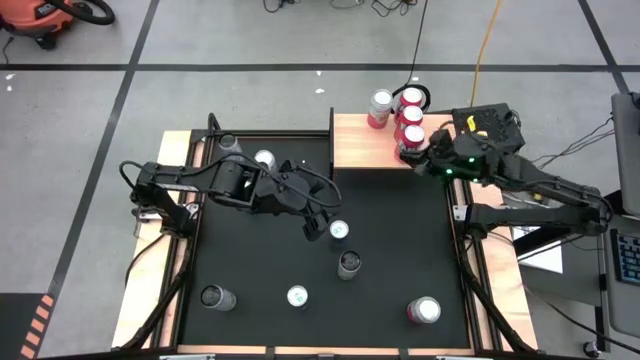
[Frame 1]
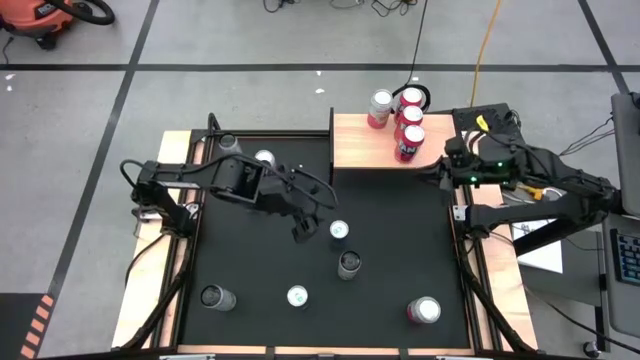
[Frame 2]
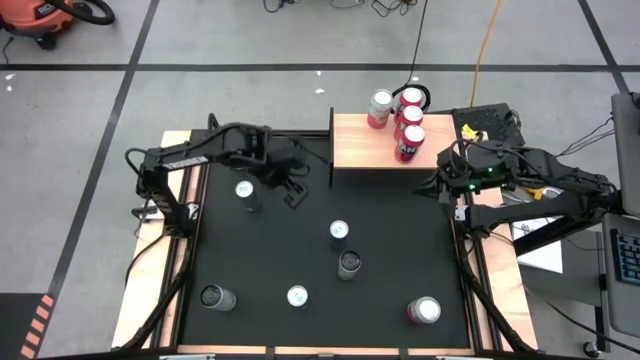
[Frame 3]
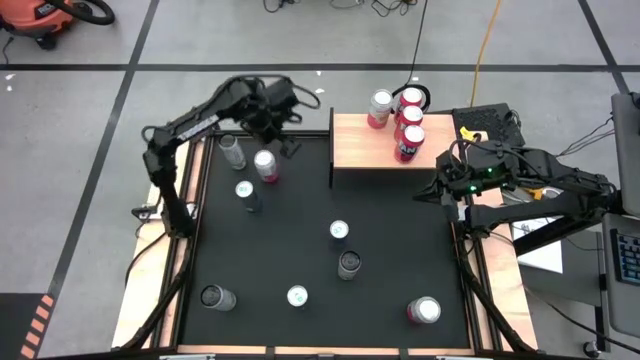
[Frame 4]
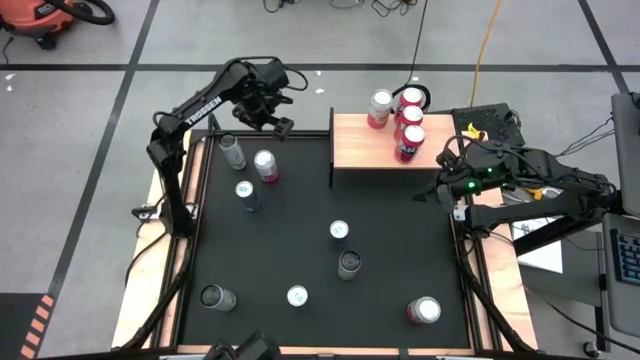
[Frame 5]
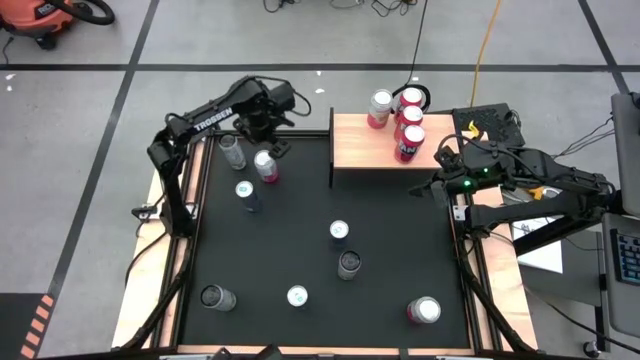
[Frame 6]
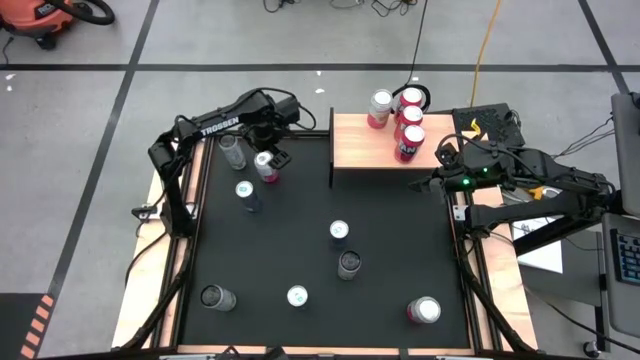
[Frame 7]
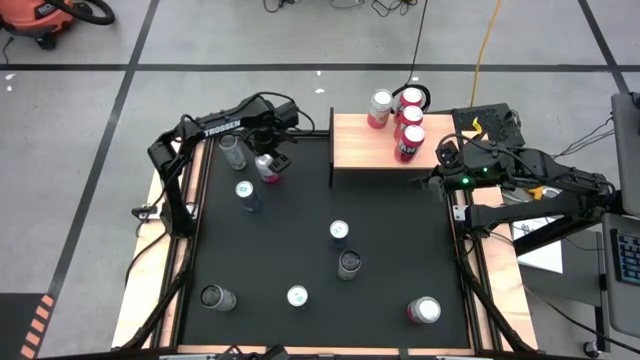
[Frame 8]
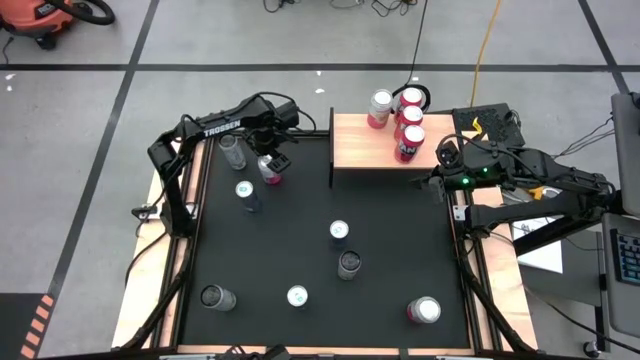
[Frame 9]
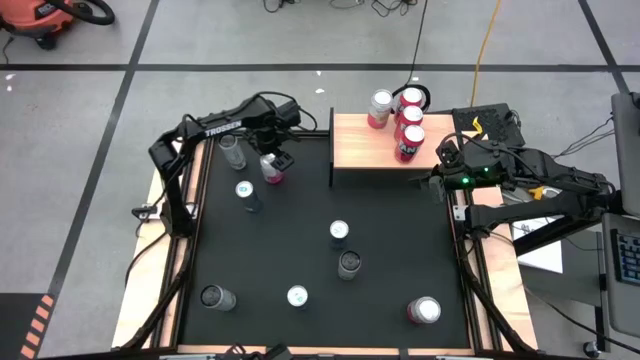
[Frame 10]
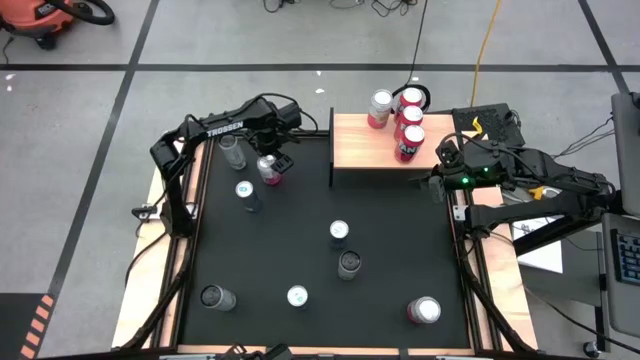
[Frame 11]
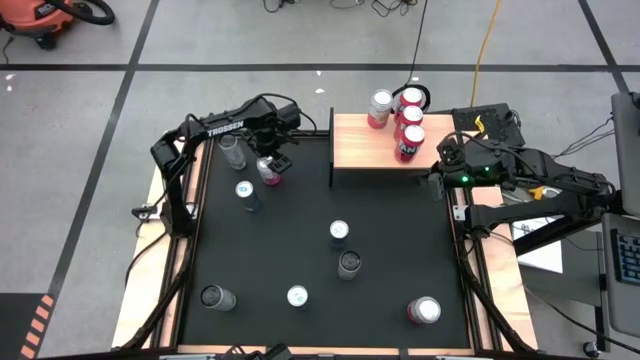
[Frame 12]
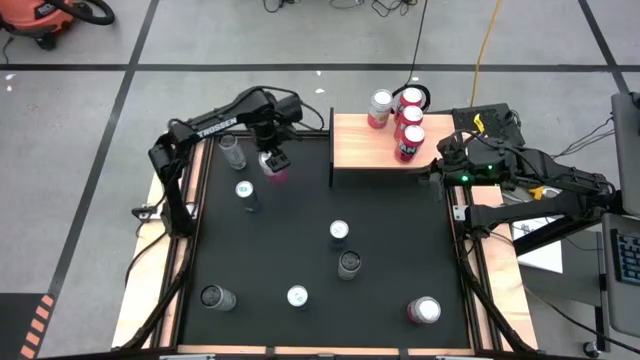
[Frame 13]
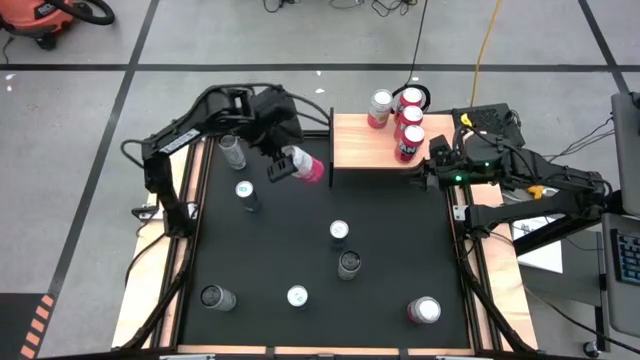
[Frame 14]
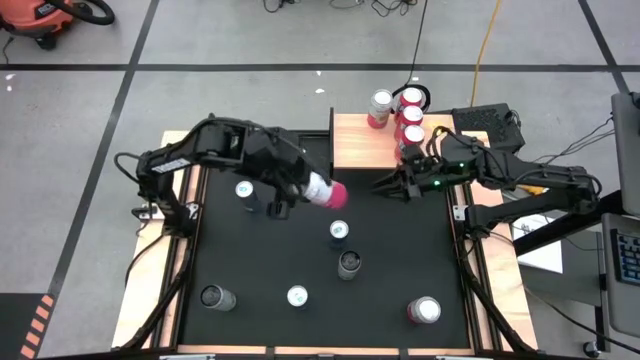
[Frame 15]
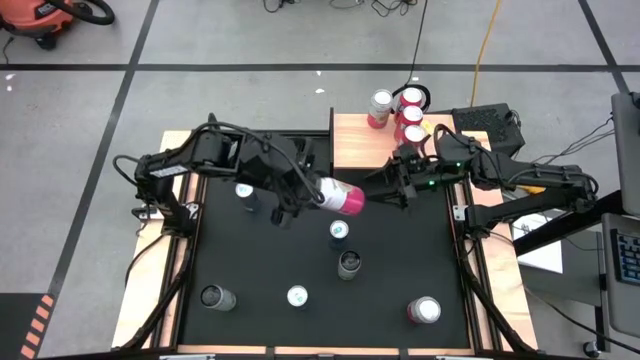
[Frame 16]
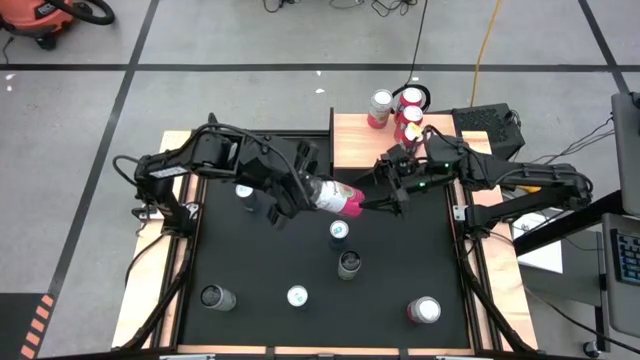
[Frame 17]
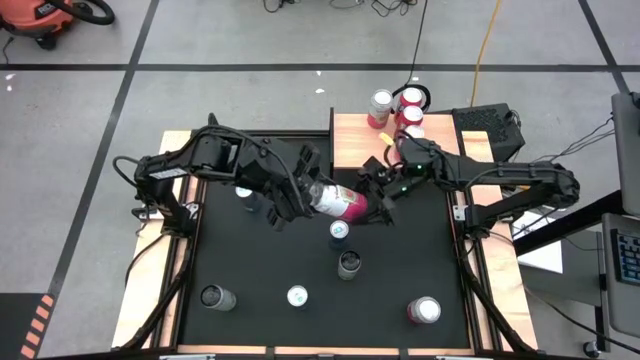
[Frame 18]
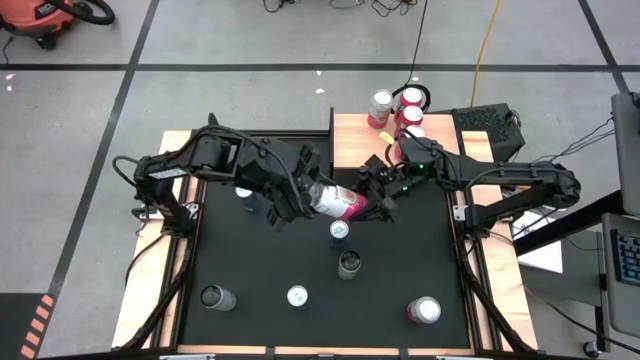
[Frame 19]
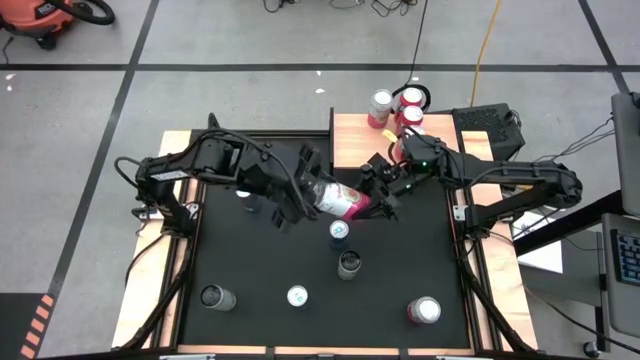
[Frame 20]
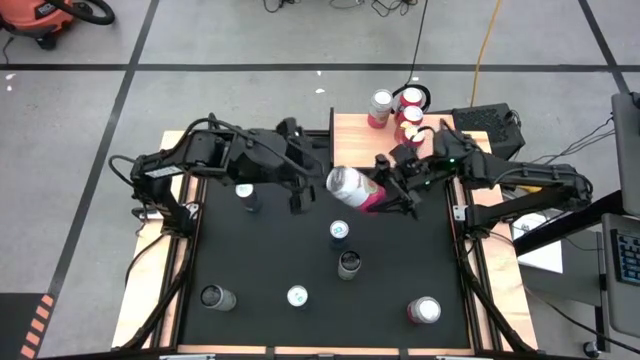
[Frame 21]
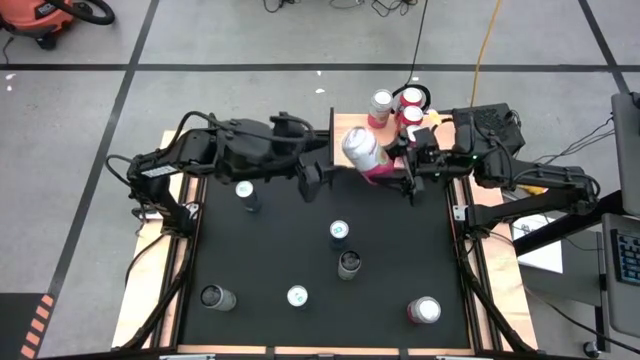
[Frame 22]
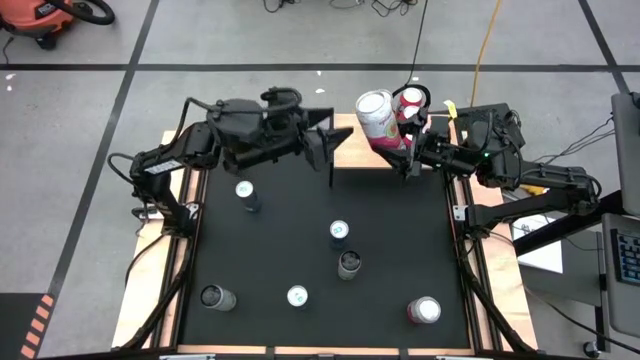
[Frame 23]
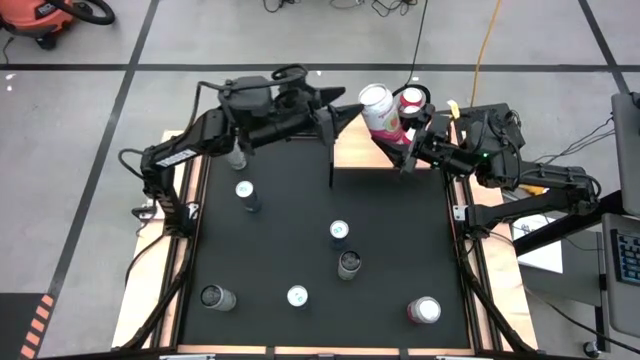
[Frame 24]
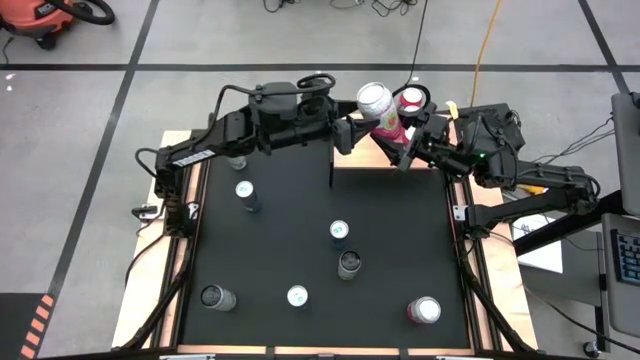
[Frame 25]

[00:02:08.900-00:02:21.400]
Task: Place canned beverage on shelf
Put the top pink white soda can on the shelf aligned with the other pink white soda can

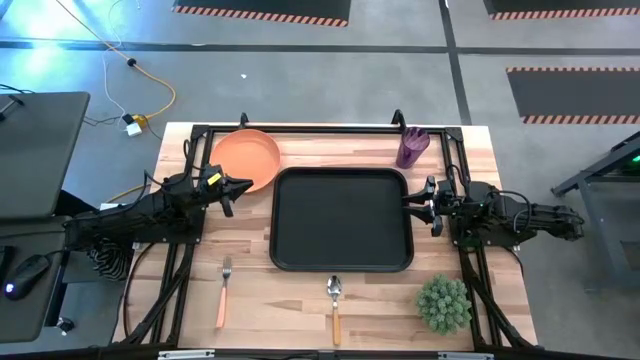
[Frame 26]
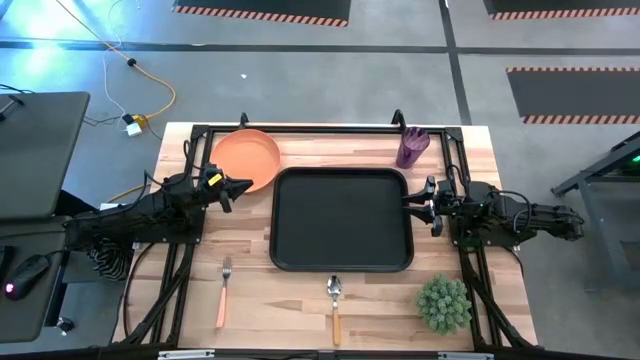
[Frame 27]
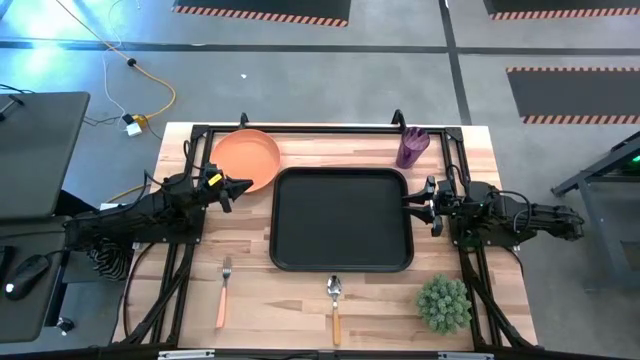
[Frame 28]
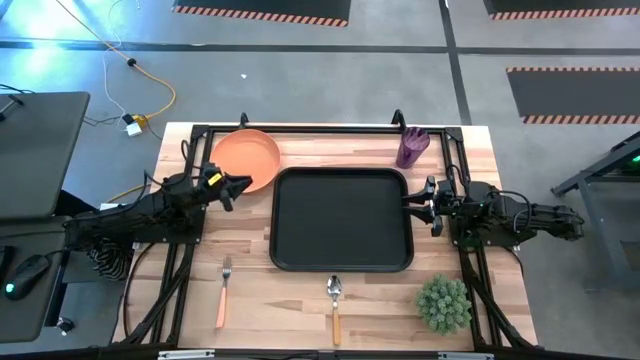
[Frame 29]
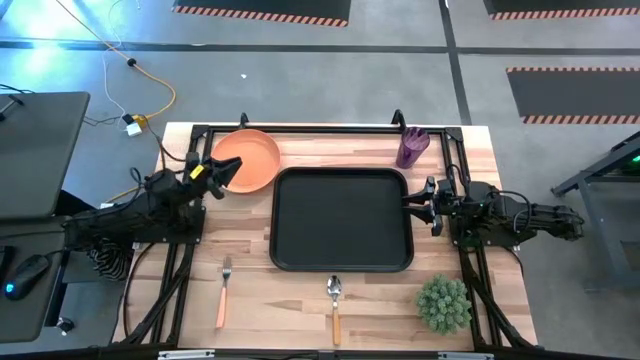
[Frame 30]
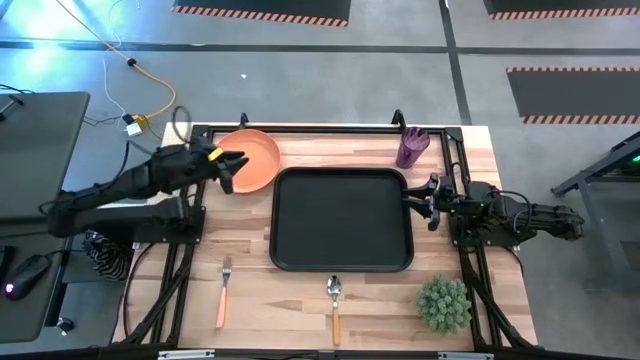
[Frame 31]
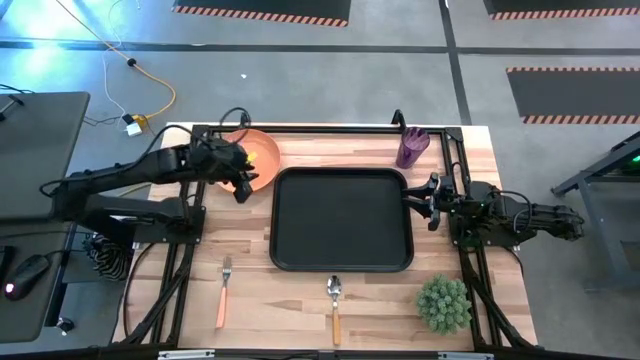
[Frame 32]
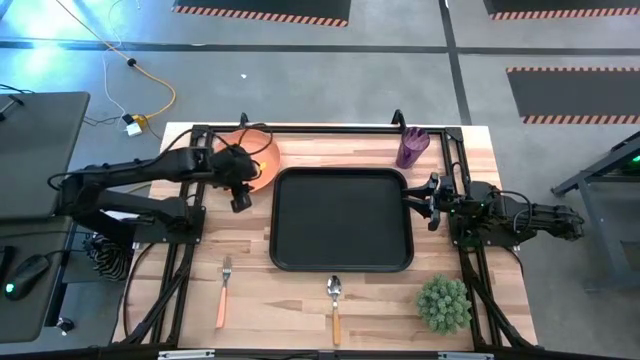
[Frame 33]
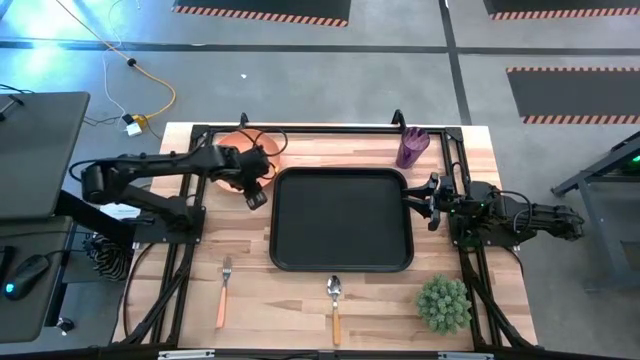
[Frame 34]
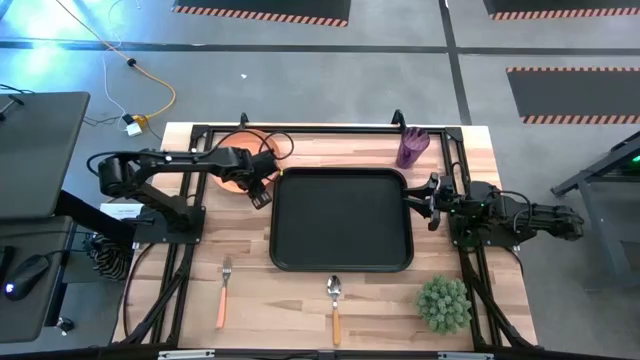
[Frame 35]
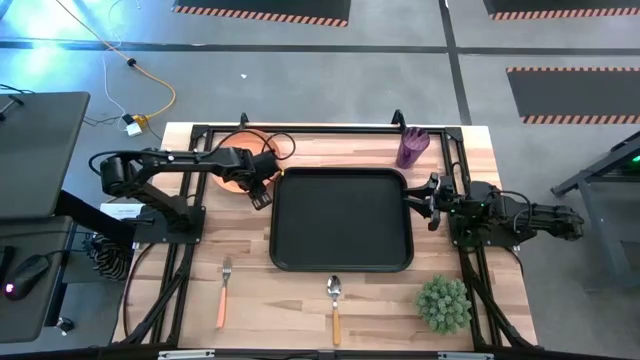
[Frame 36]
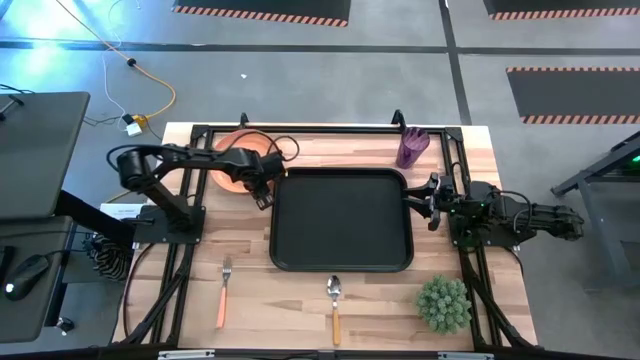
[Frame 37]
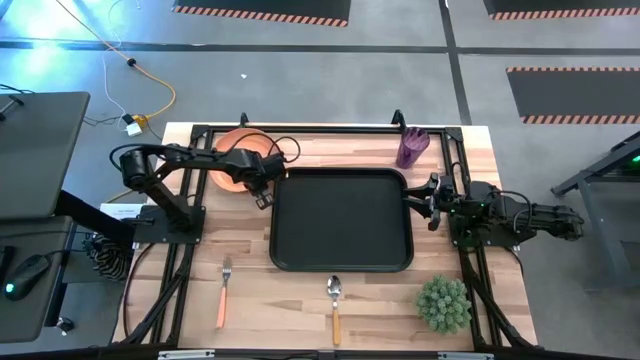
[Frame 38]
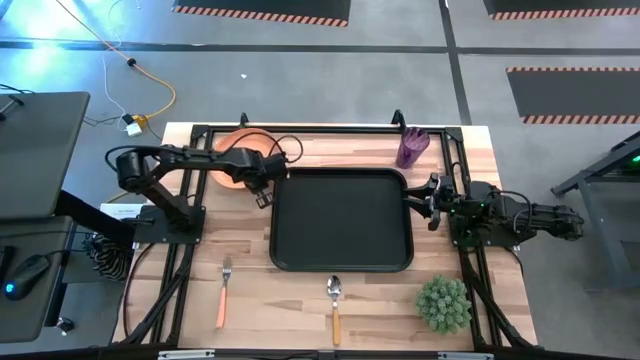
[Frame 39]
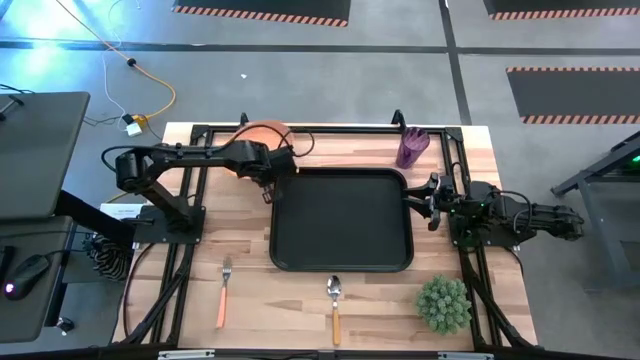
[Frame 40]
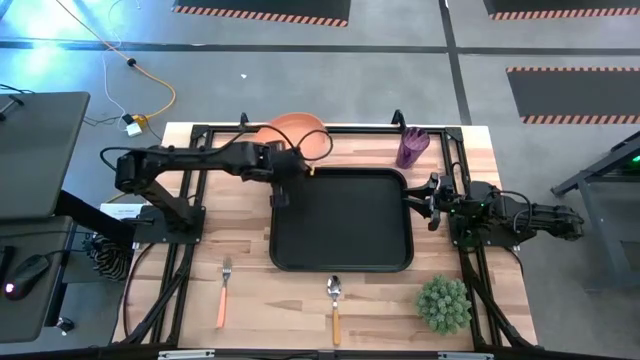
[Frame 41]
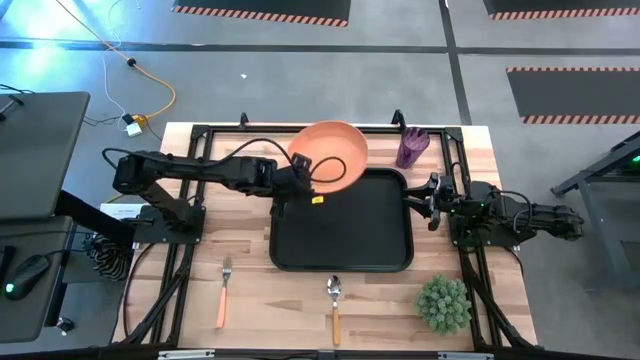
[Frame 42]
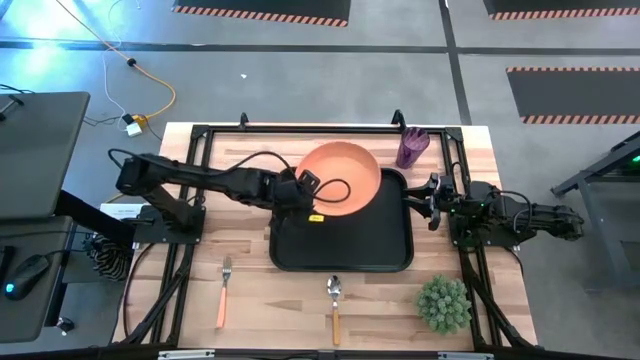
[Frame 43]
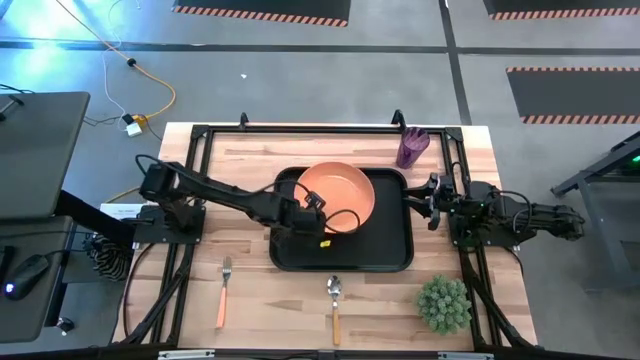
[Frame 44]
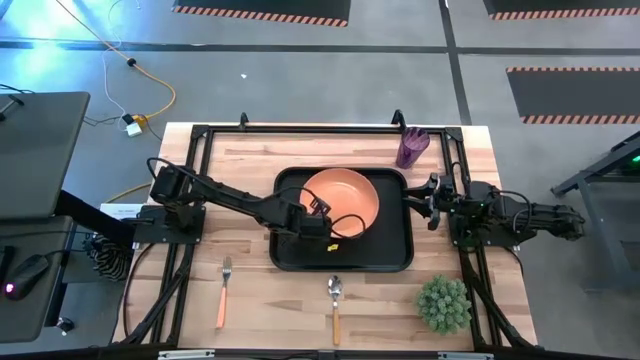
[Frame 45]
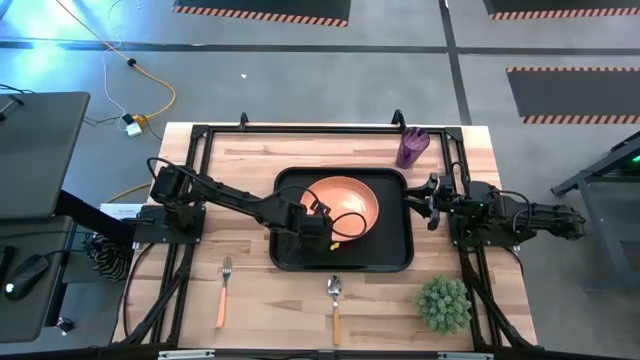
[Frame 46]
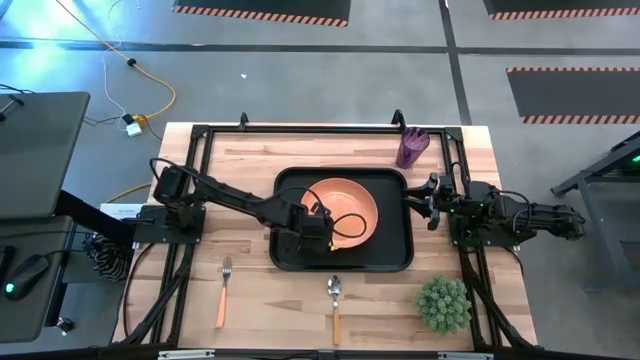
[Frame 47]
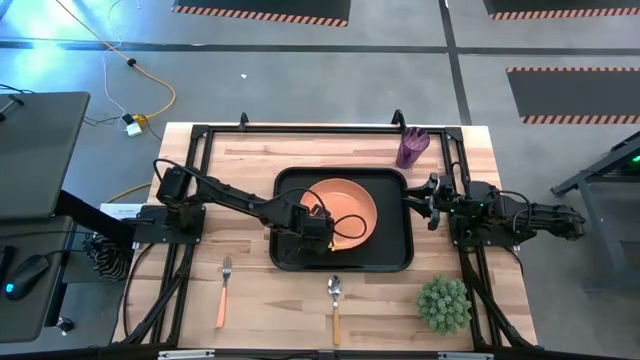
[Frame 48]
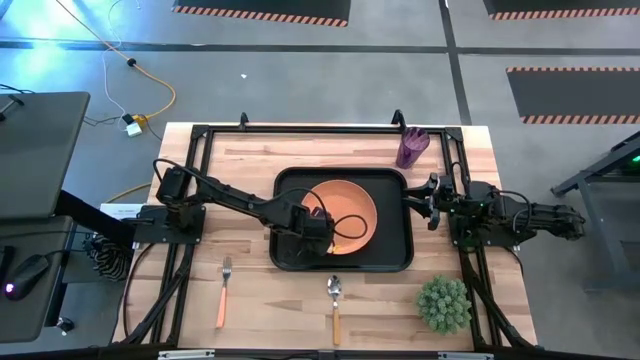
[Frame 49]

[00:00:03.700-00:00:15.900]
Task: Pick and place plate/cup/fork/spoon on tray
Put the orange plate on the black tray
